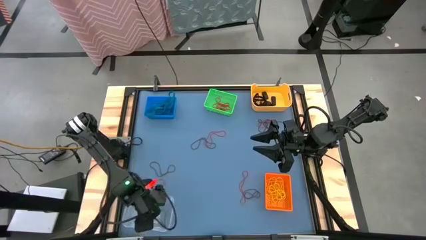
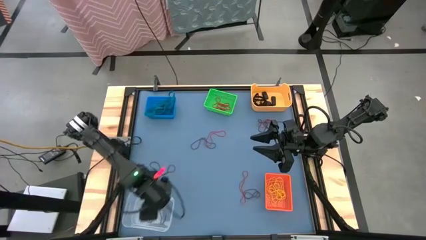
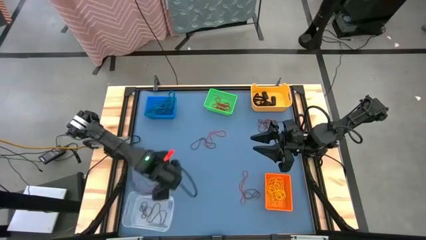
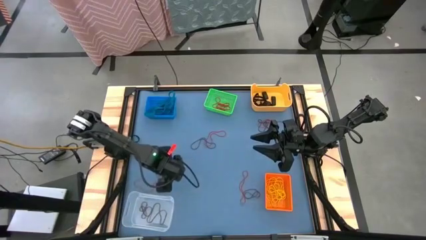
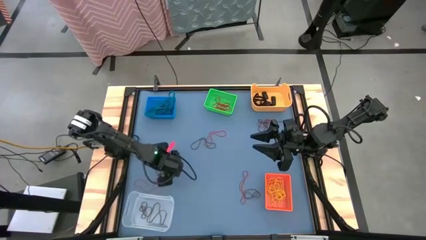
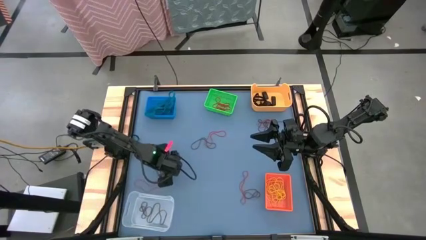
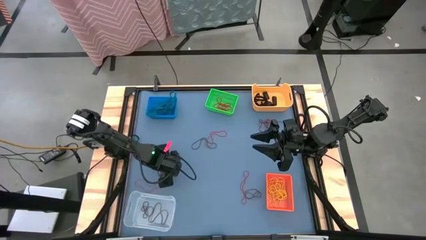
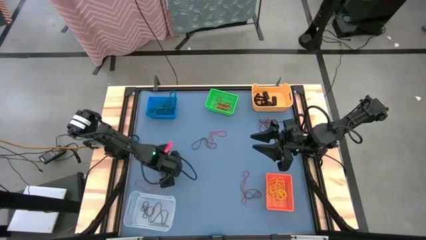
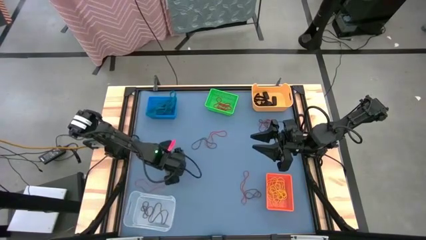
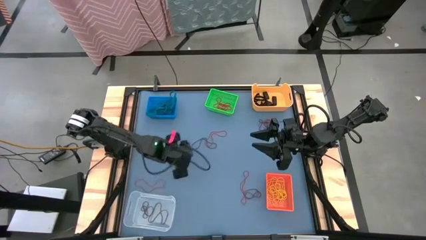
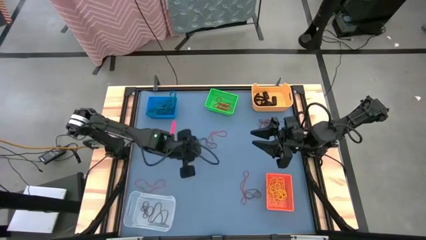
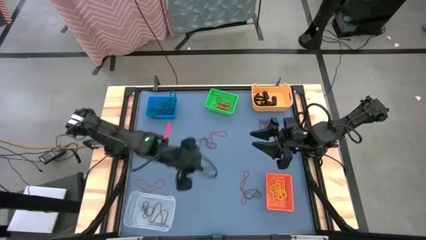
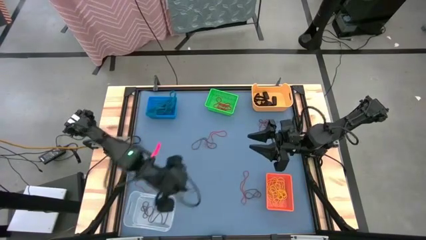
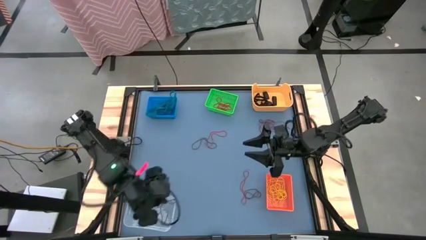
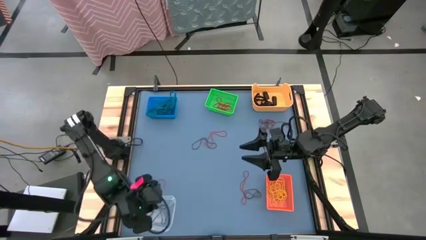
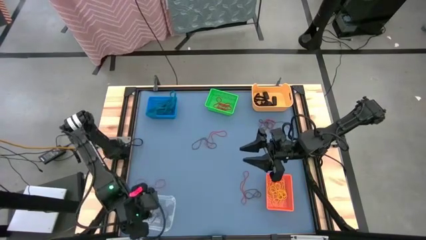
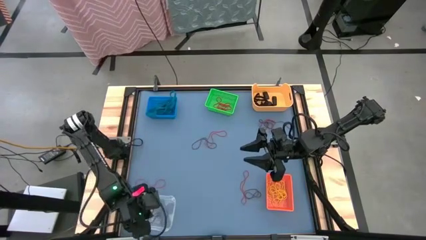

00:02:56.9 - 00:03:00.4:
Task: Sort rubber bands into baskets
Put the brown rubber band into the transparent bin

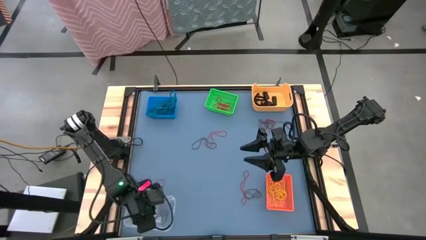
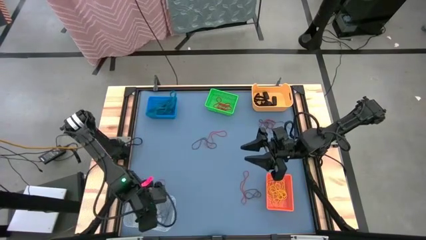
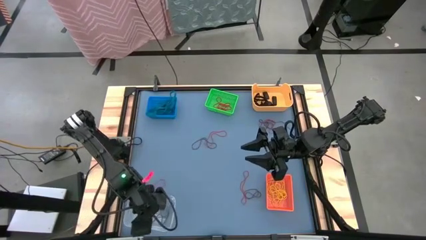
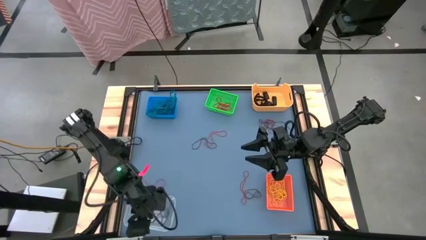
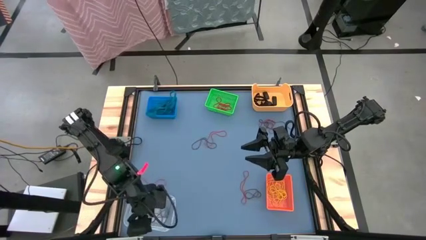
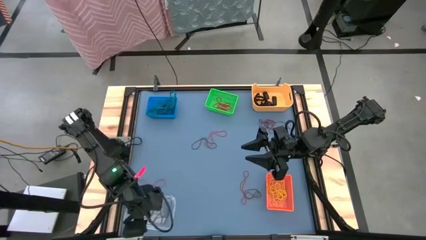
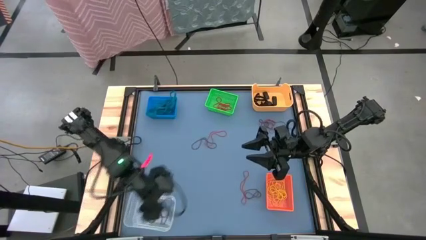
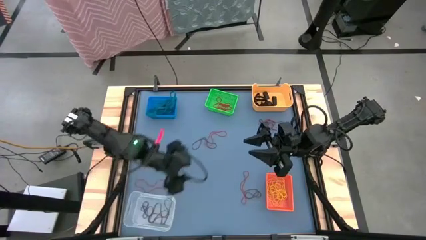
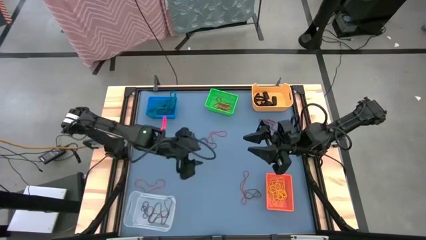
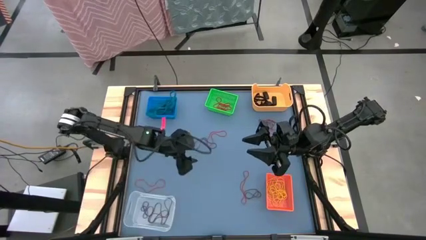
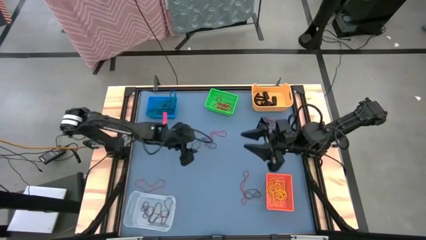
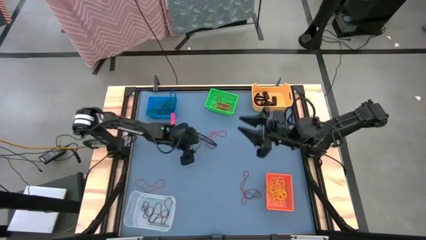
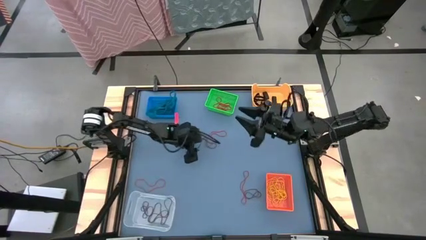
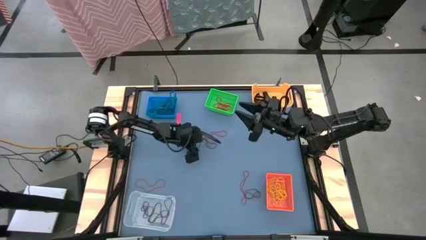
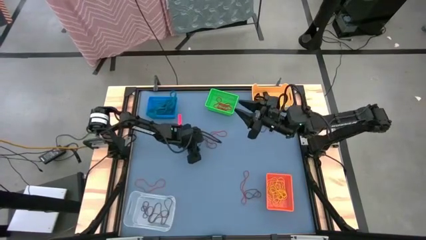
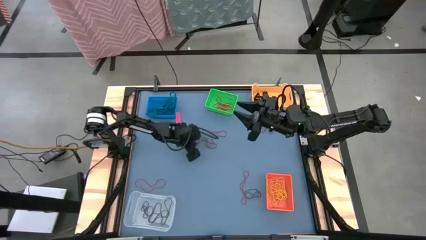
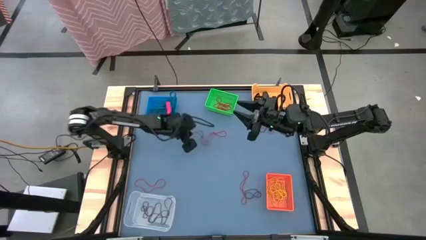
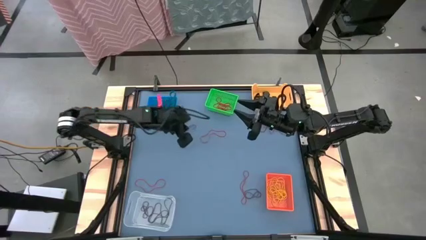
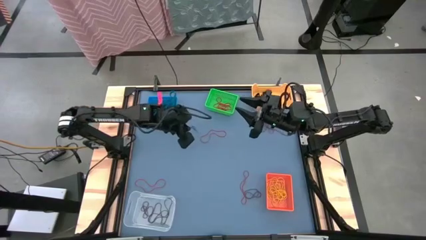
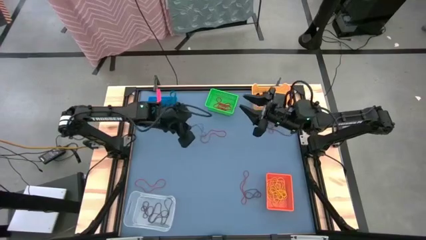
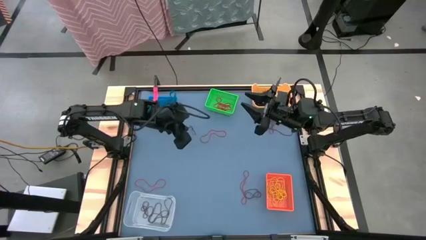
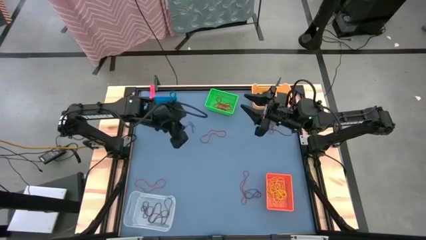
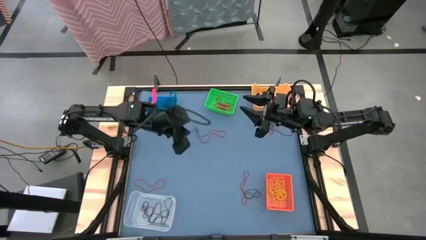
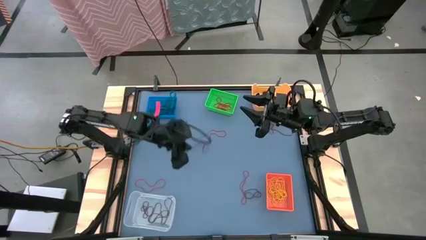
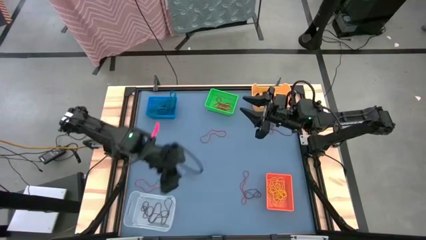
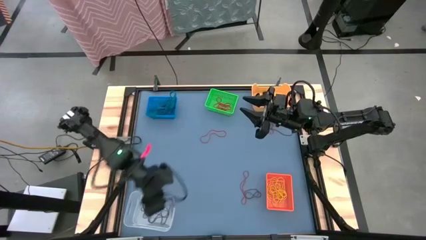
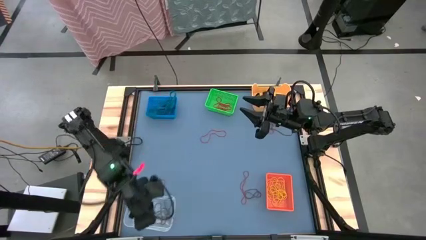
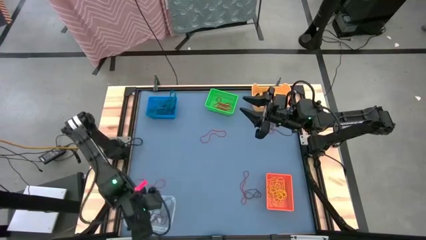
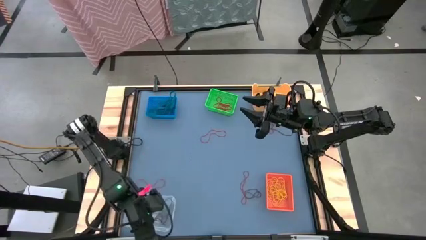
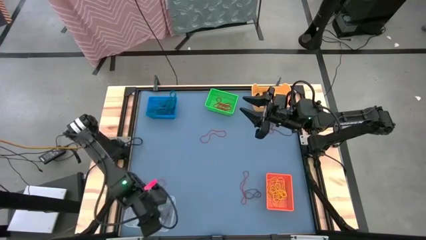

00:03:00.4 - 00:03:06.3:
Put the brown rubber band into the transparent bin

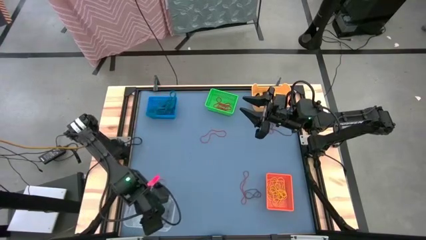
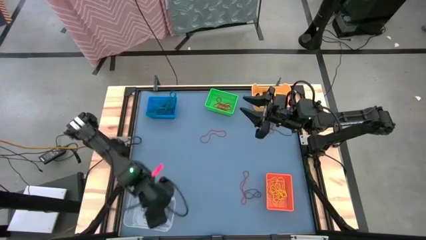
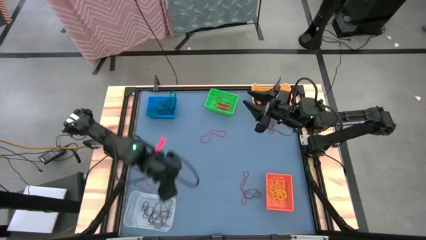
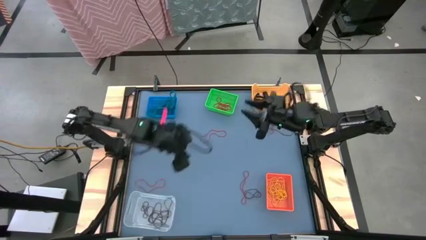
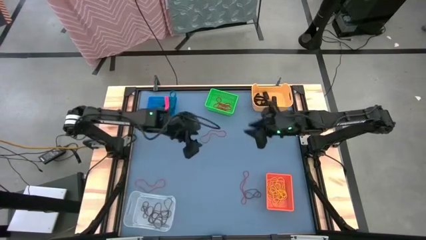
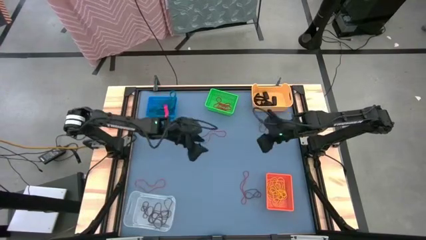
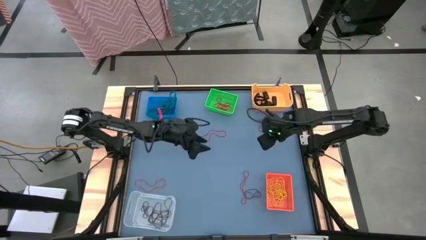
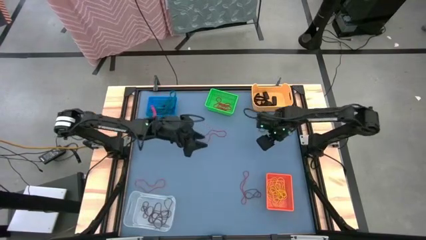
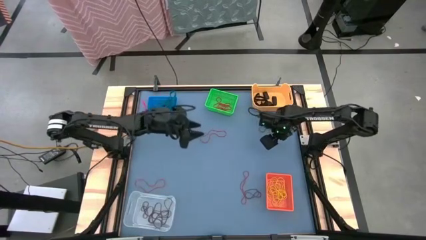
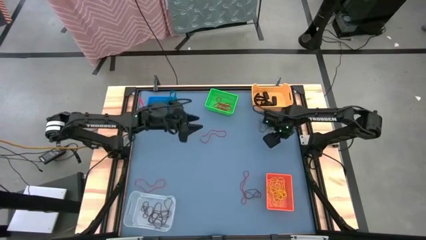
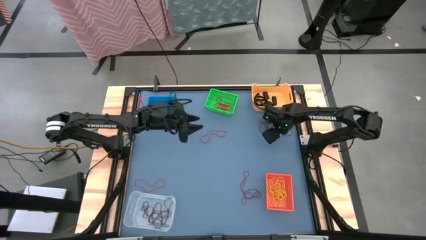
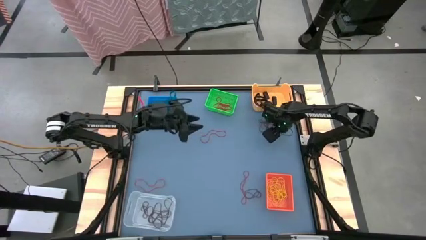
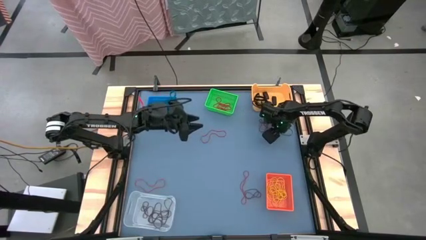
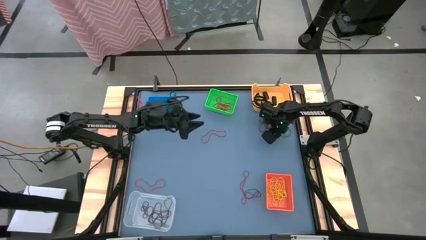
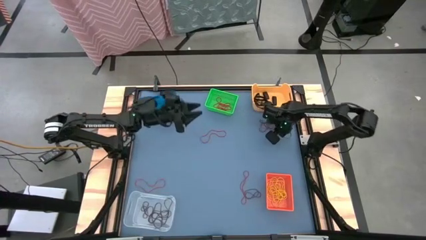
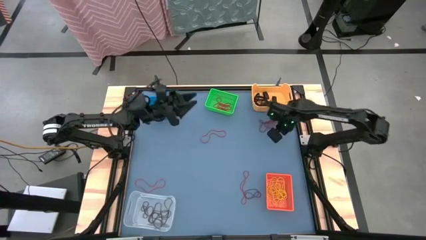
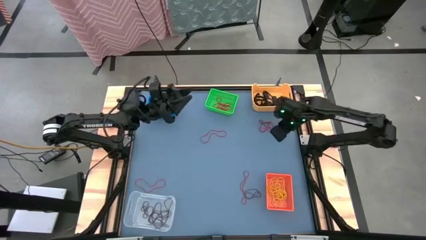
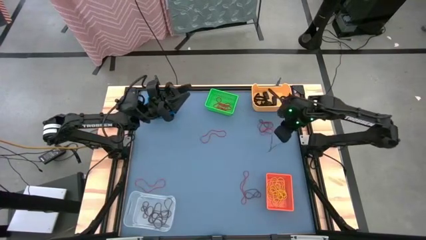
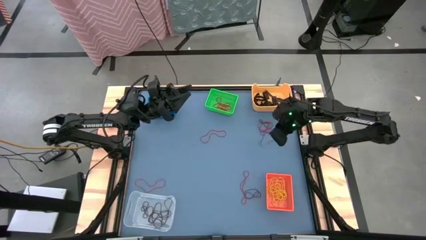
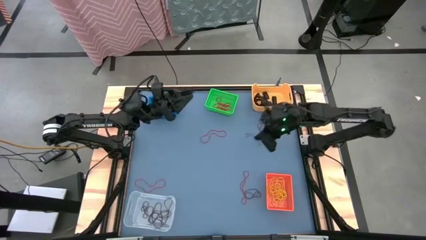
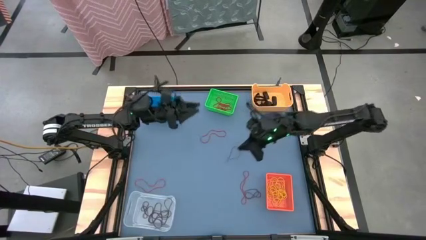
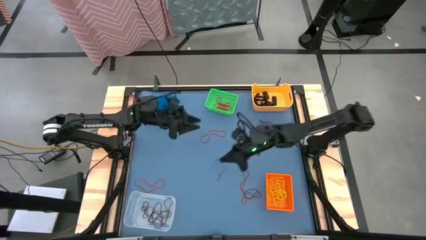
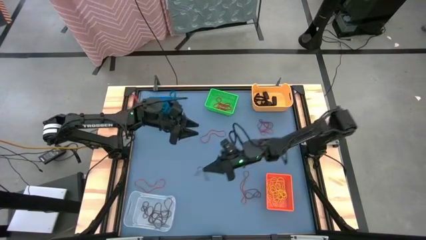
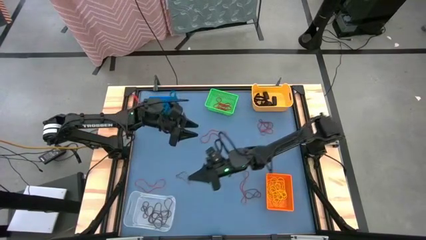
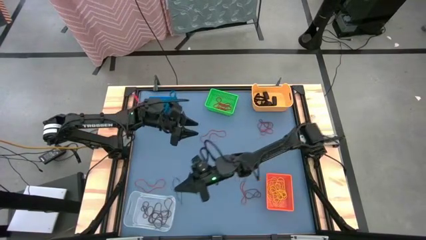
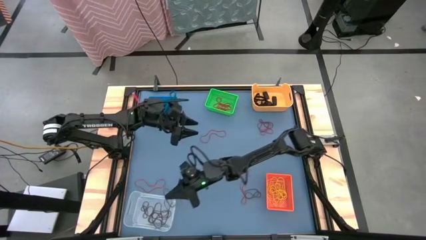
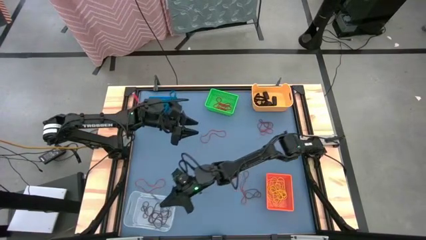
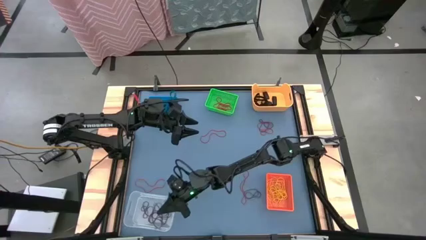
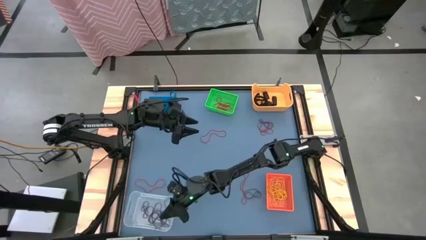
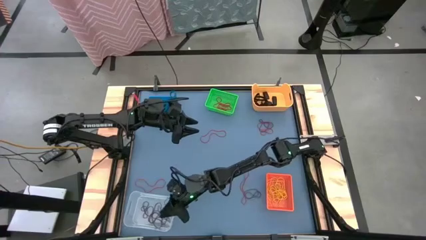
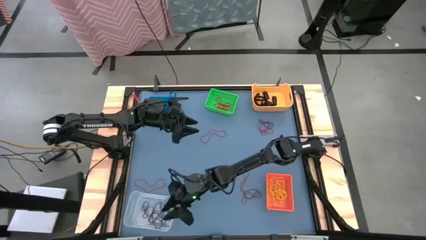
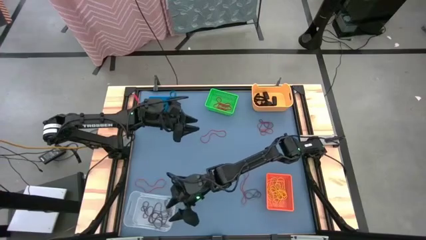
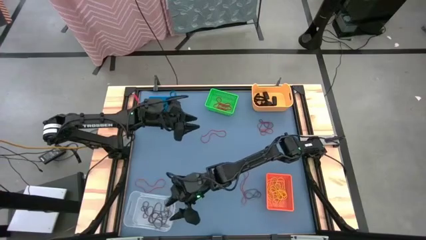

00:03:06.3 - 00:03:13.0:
Put the brown rubber band into the transparent bin

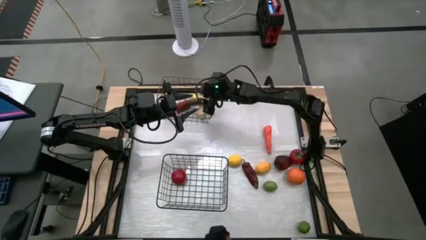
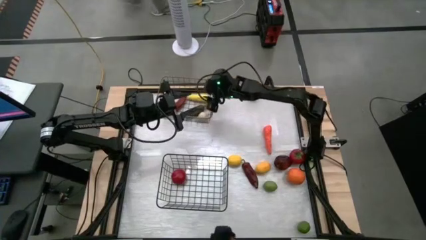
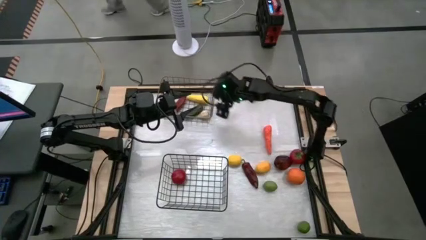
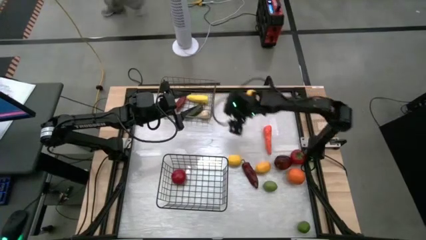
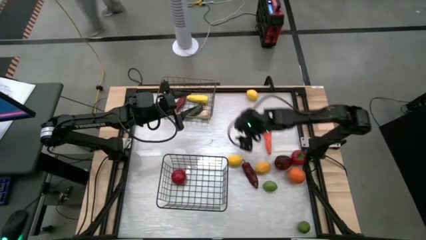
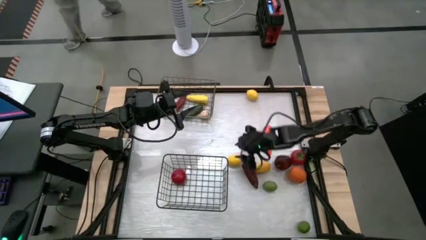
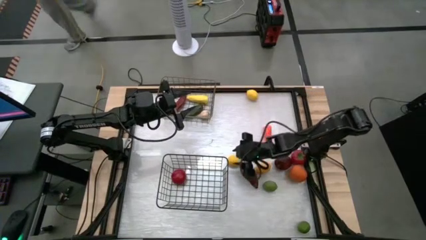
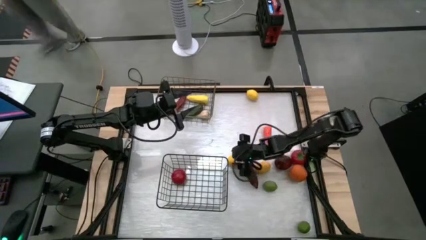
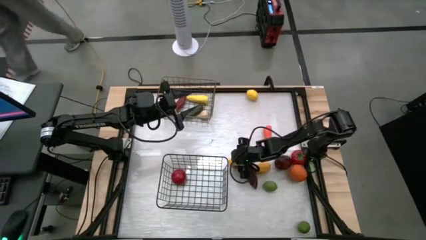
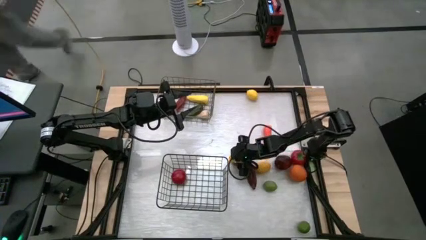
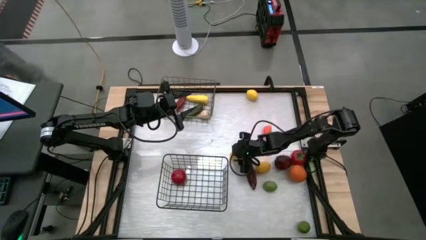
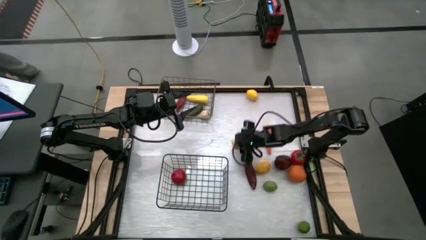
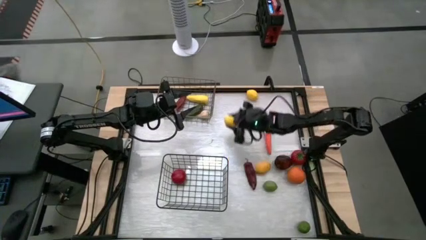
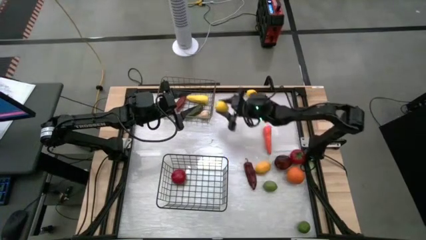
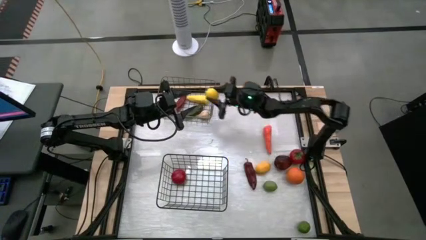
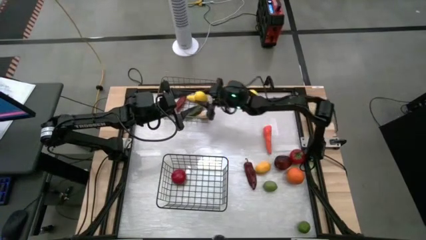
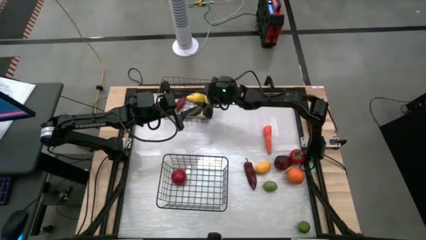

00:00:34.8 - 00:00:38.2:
Task: Sort produce into baskets
Put the yellow lemon into the top wire basket
